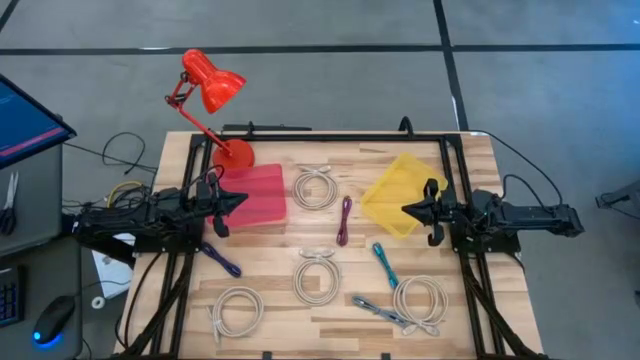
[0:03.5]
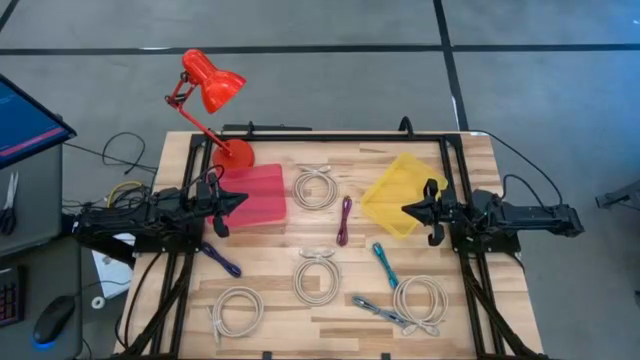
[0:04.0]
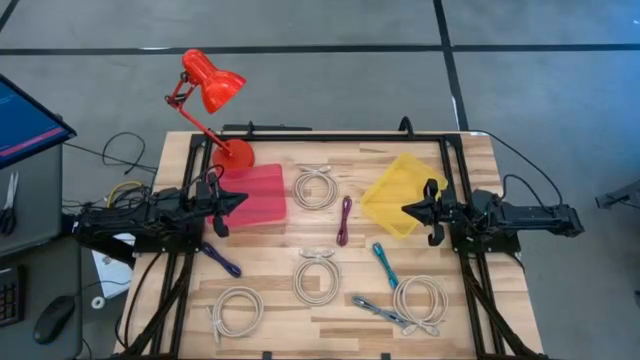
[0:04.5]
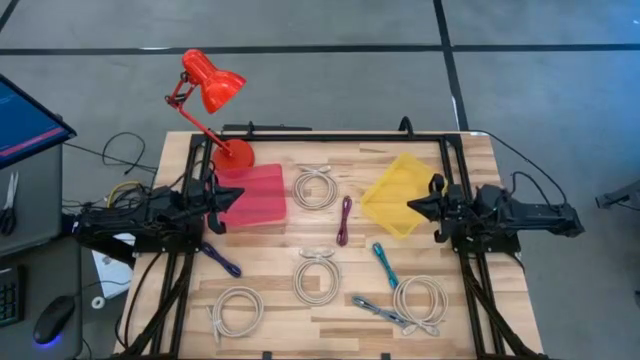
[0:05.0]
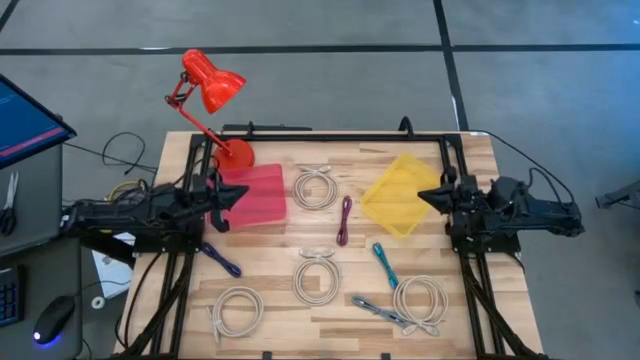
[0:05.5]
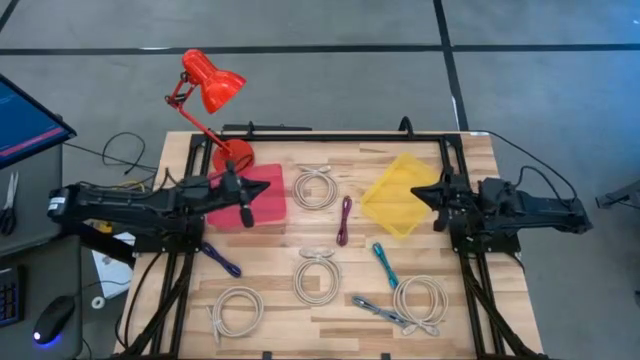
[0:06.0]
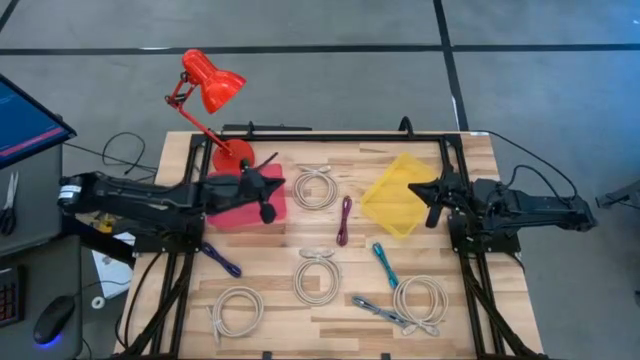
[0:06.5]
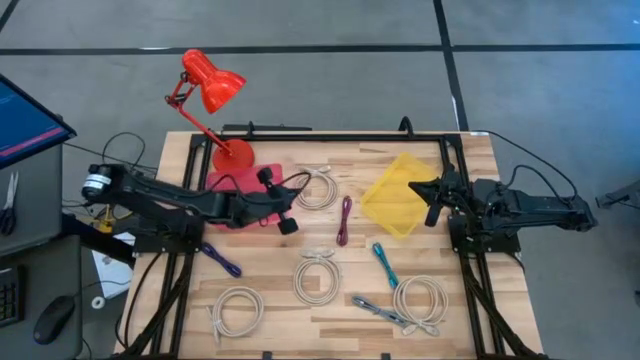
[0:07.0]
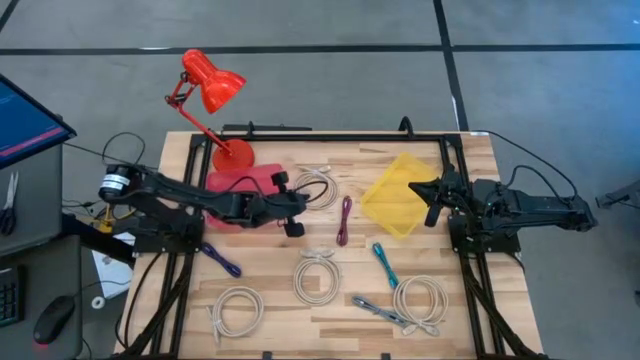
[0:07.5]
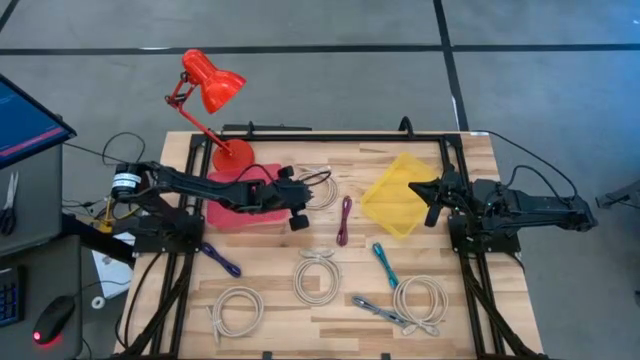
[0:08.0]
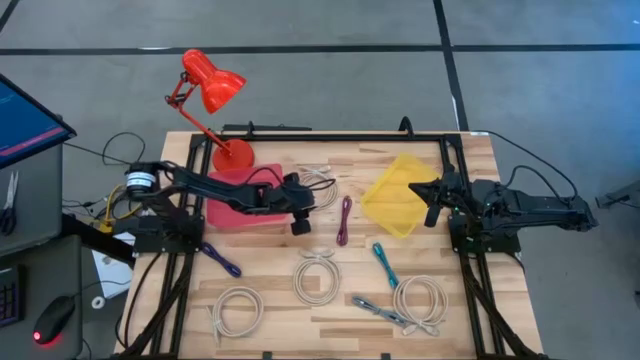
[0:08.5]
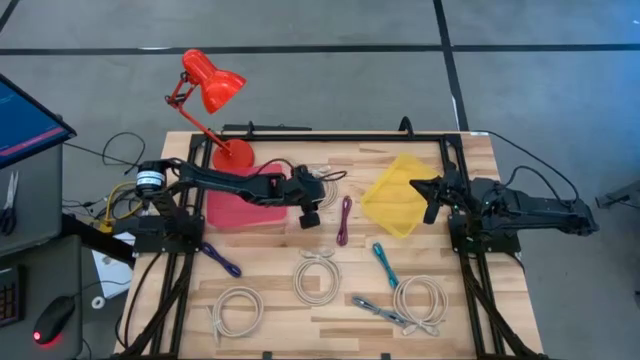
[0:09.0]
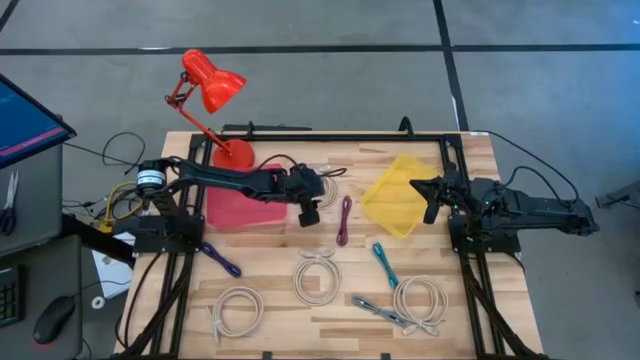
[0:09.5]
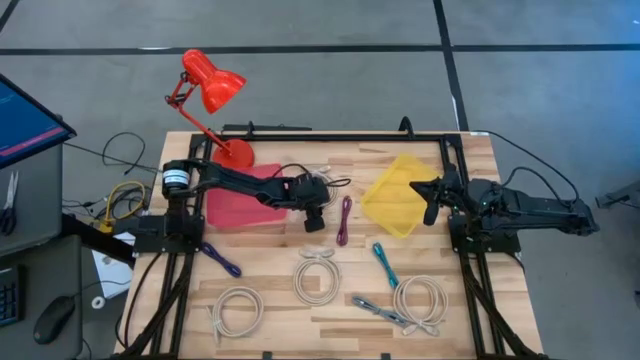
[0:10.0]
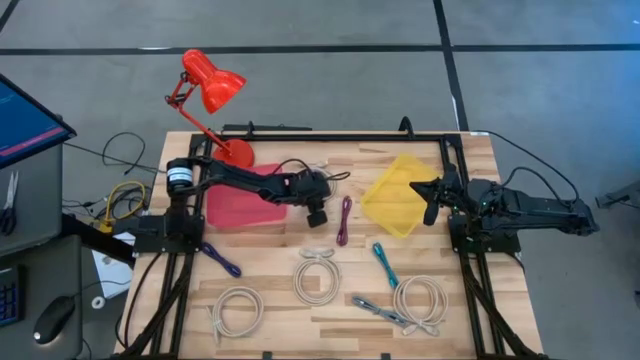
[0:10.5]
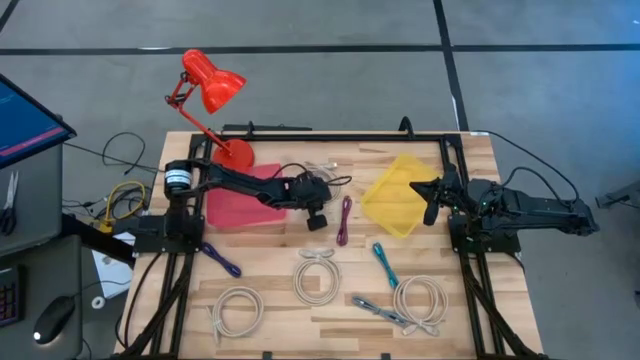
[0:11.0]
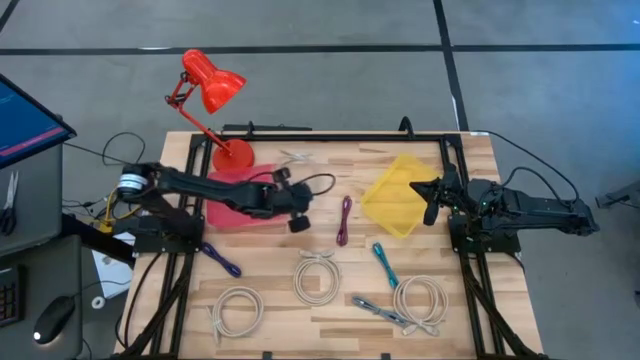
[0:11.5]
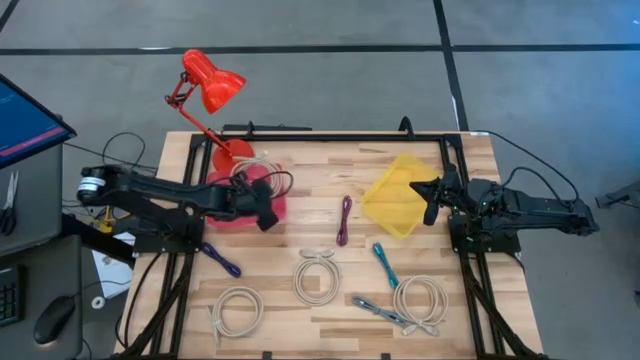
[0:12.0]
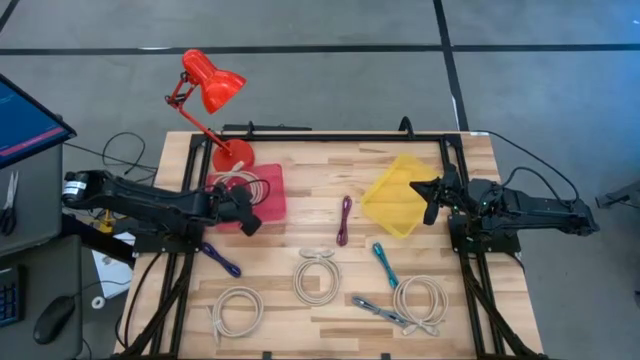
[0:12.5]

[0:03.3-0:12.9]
Task: Pick & Place USB Port
Put the brown USB cable into the pink bin

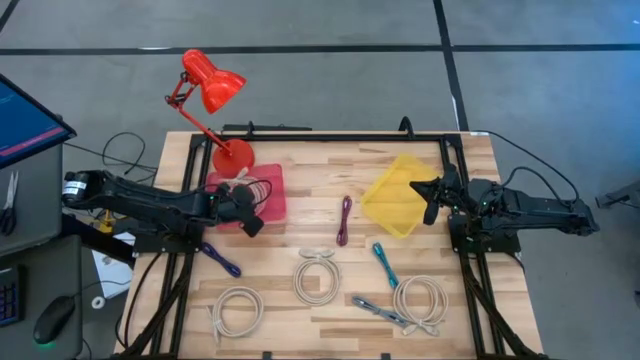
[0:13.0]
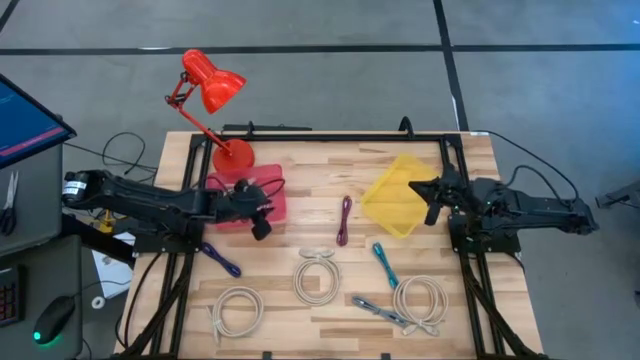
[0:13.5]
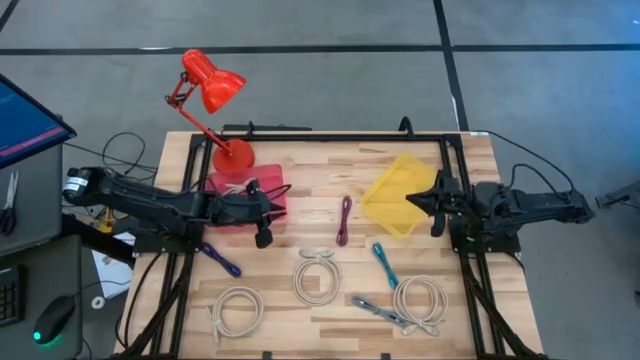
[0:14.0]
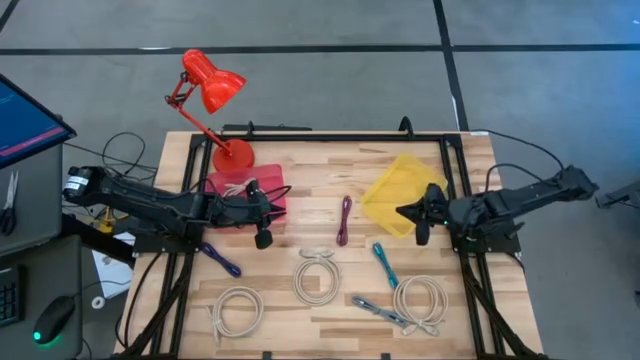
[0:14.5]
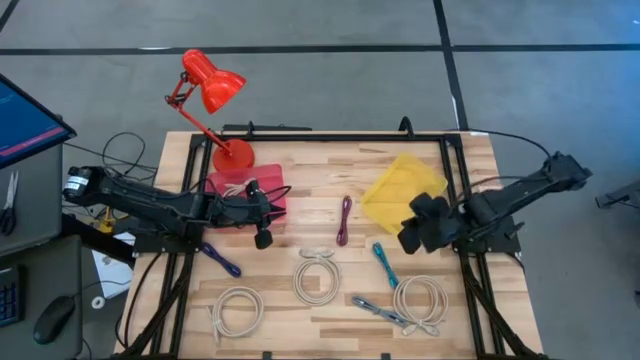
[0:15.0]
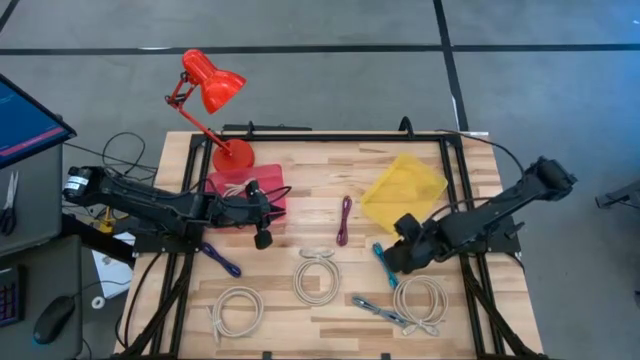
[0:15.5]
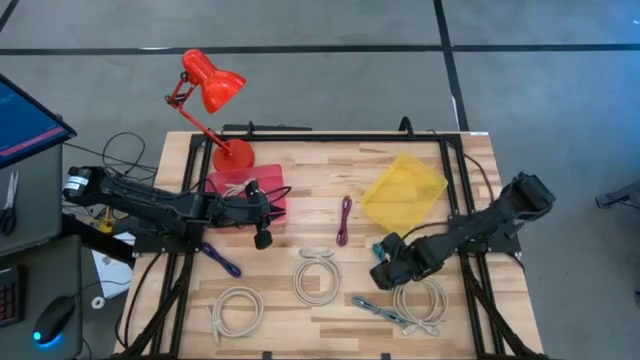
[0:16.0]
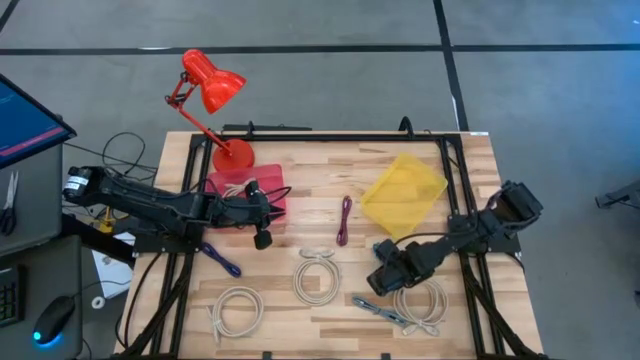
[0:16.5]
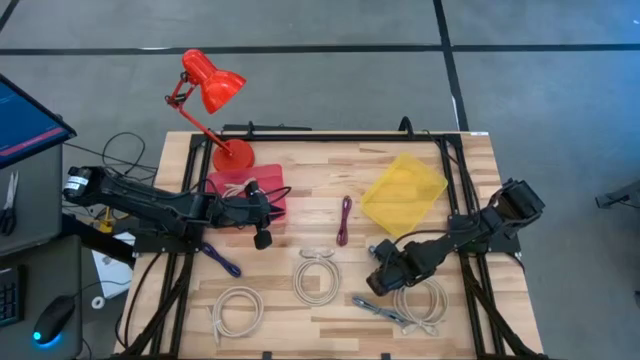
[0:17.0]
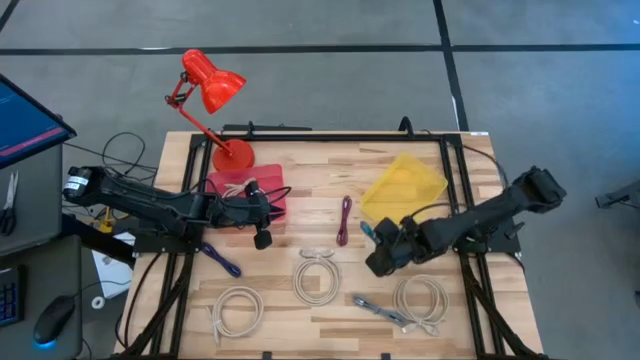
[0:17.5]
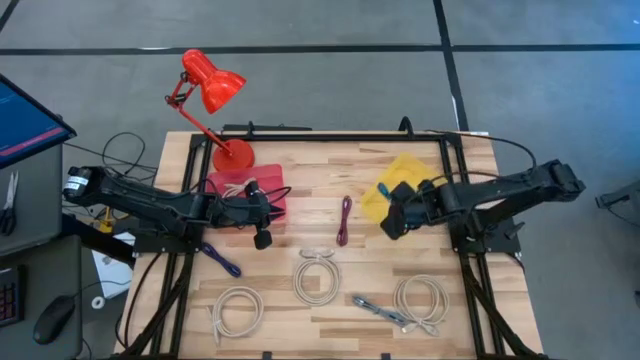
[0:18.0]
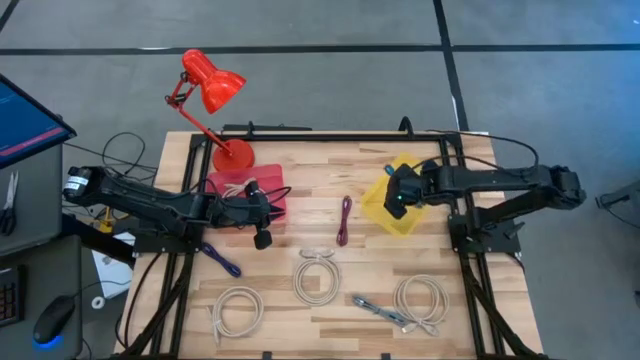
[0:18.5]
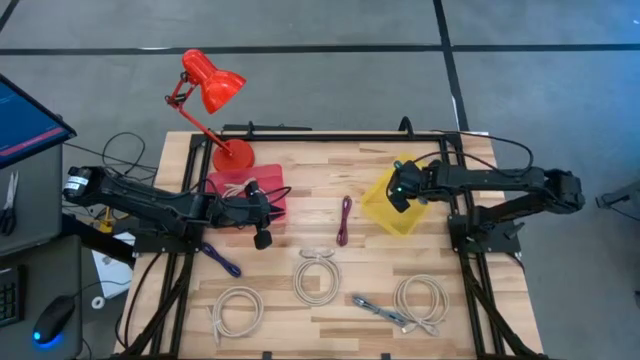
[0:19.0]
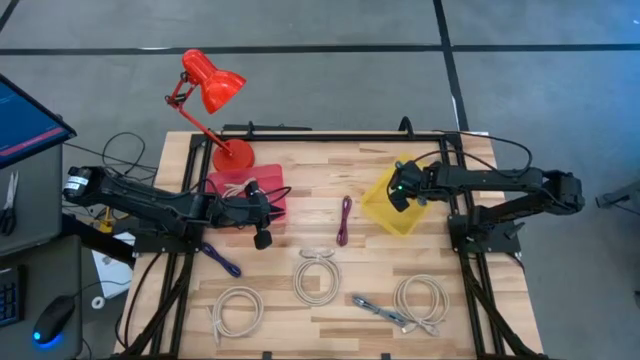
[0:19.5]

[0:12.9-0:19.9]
Put the blue USB cable into the yellow bin

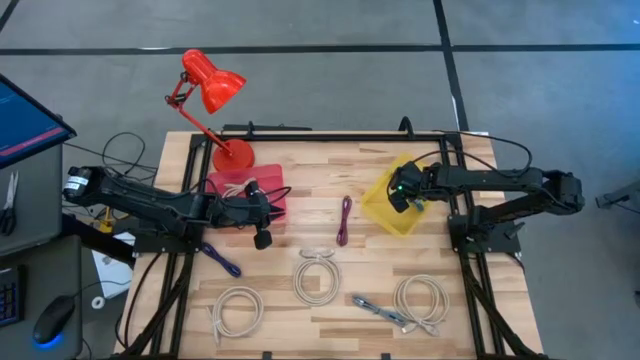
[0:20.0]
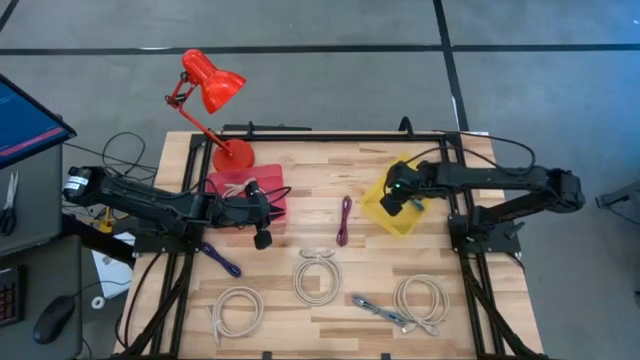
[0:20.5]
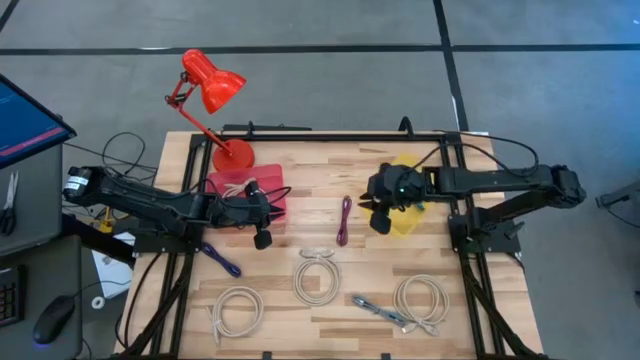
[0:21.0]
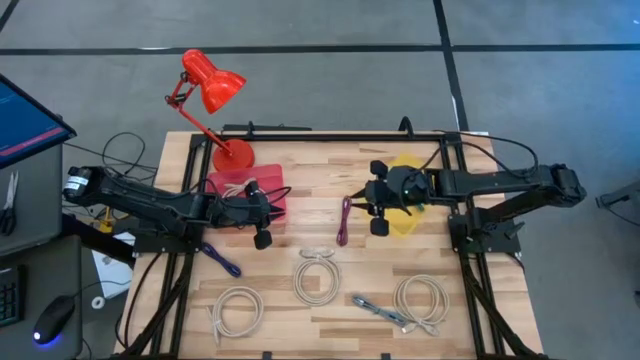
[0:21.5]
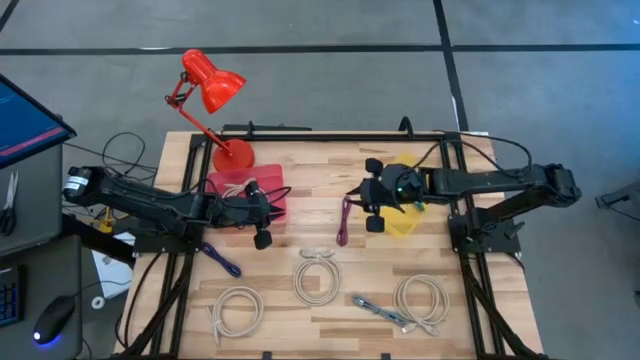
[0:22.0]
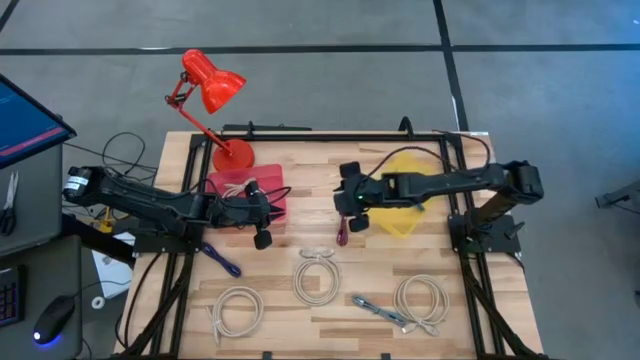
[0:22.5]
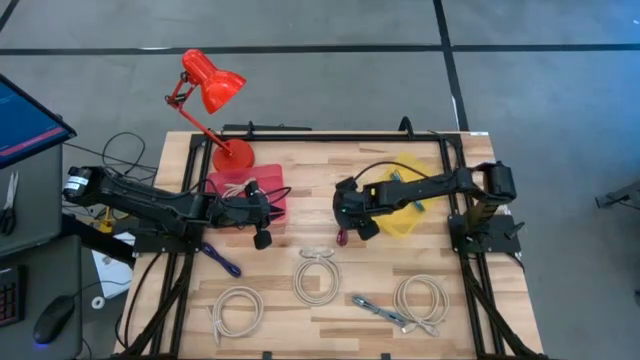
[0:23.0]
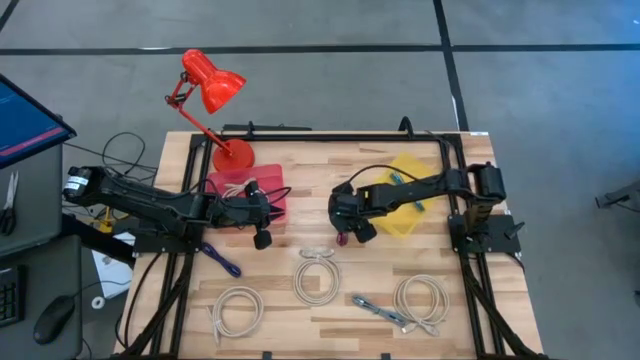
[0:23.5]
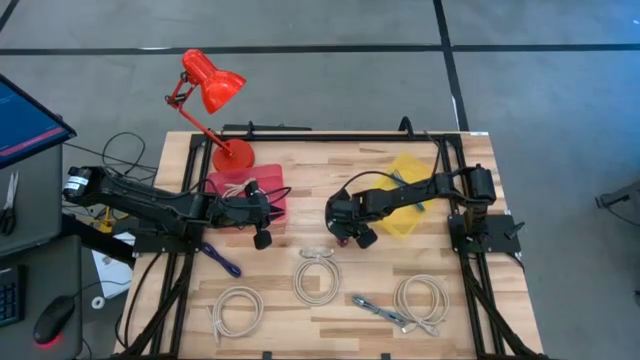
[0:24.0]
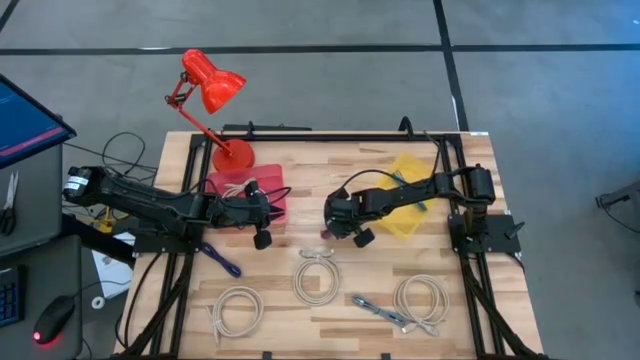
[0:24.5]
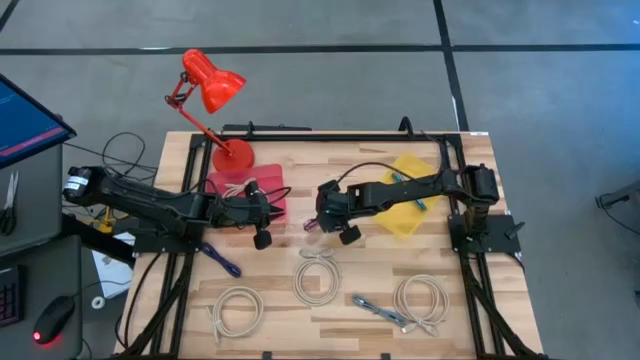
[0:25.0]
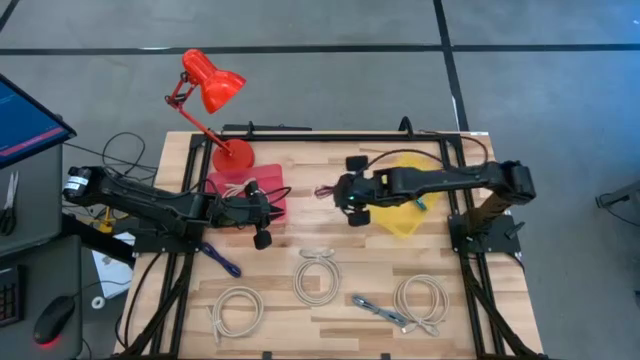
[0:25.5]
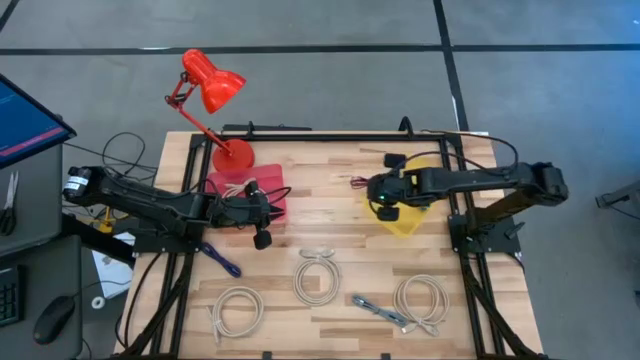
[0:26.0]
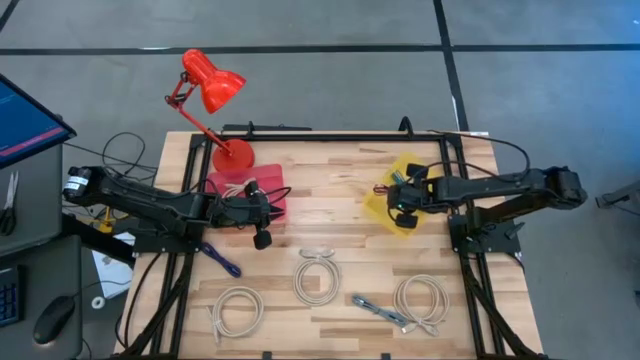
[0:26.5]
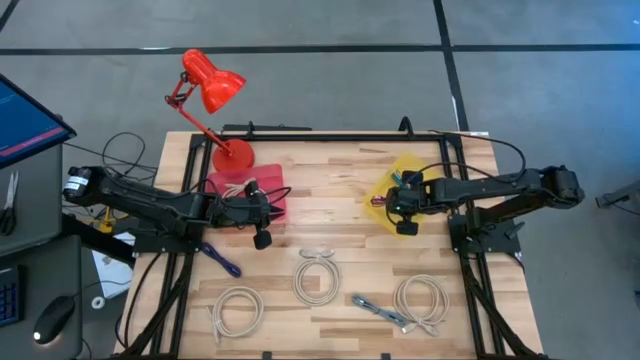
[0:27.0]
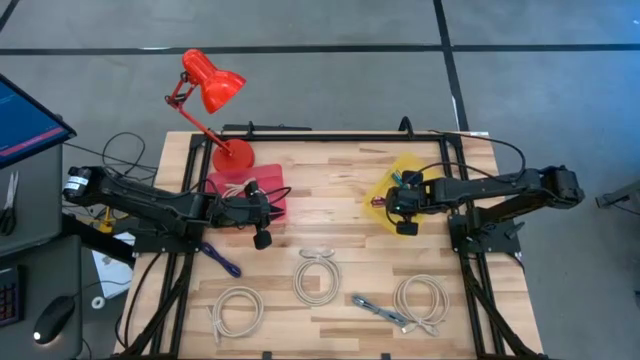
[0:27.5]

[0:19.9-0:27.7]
Put the pink USB cable into the yellow bin
